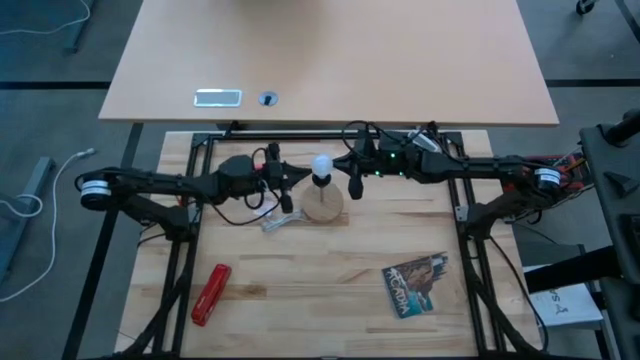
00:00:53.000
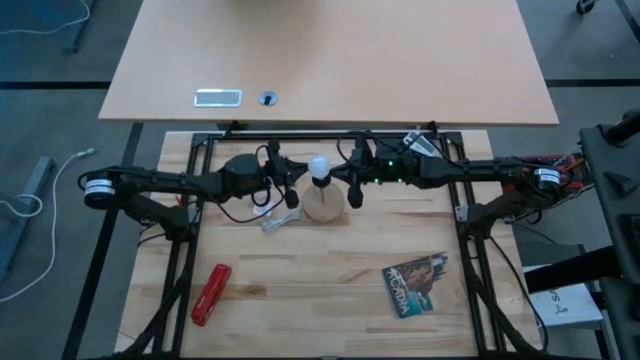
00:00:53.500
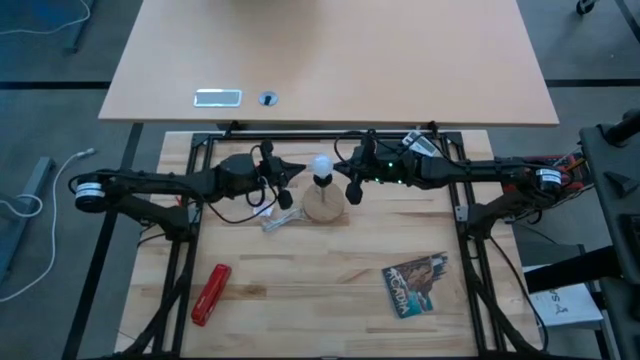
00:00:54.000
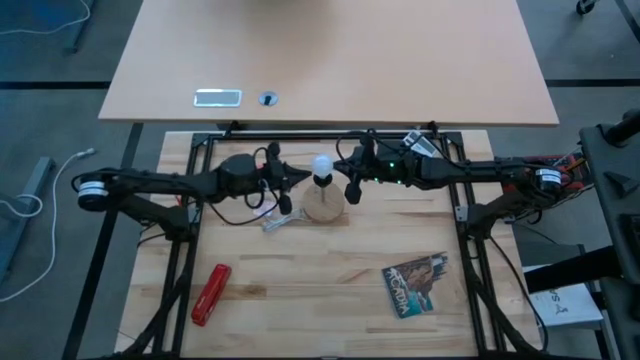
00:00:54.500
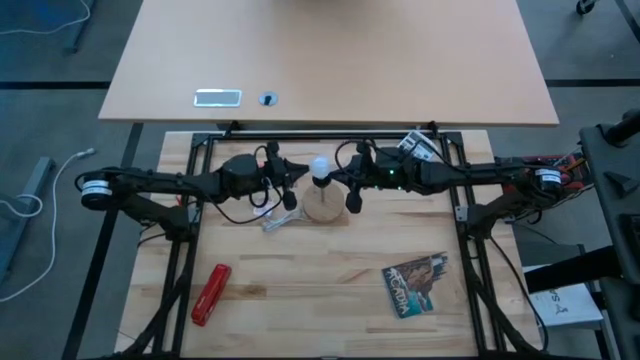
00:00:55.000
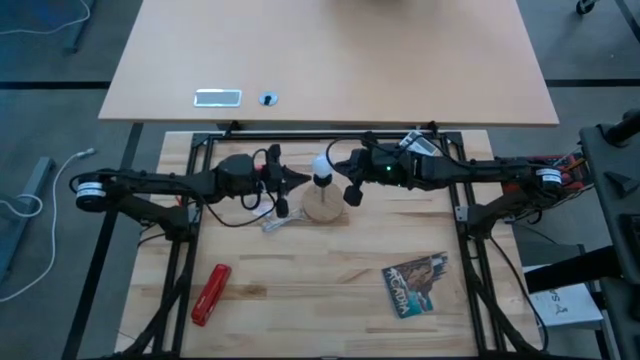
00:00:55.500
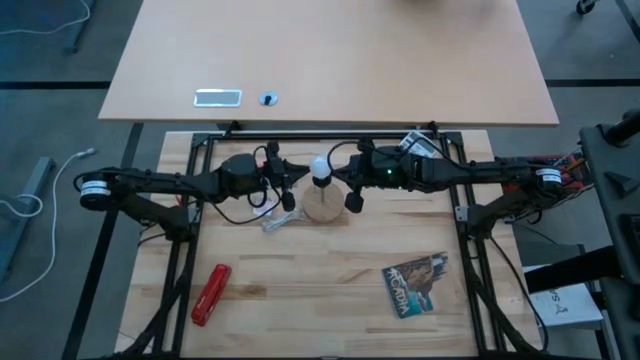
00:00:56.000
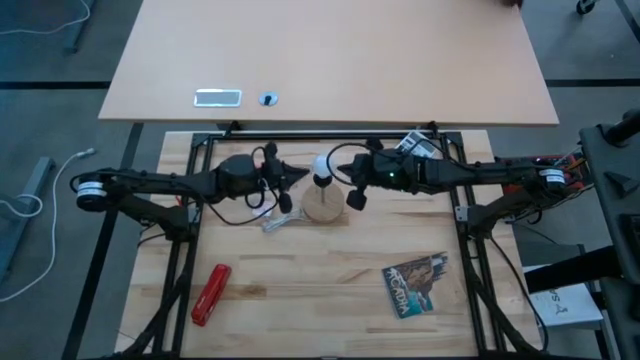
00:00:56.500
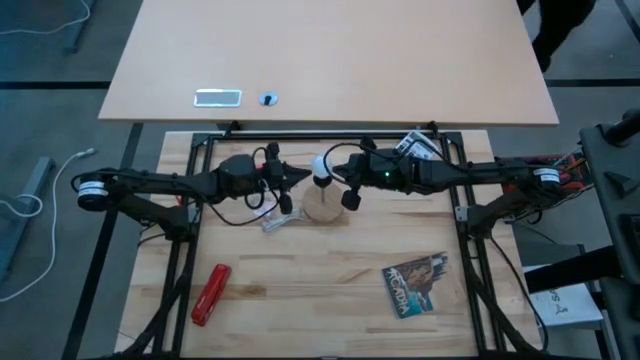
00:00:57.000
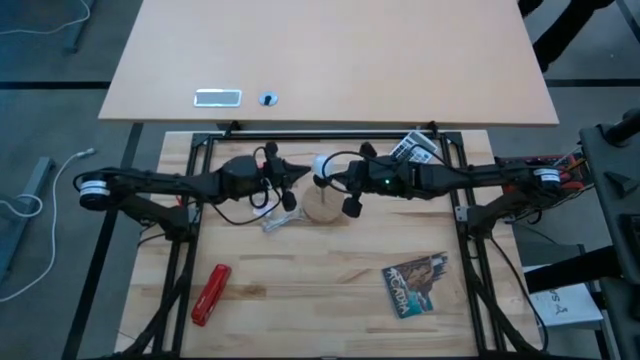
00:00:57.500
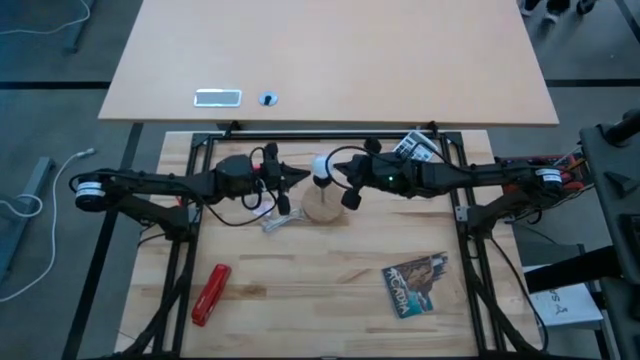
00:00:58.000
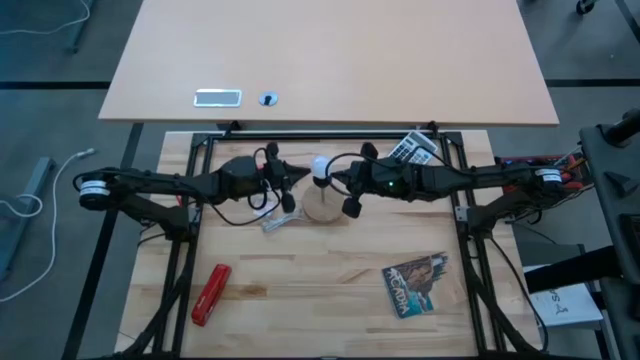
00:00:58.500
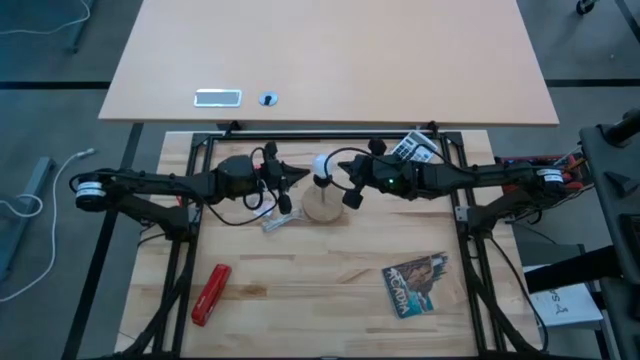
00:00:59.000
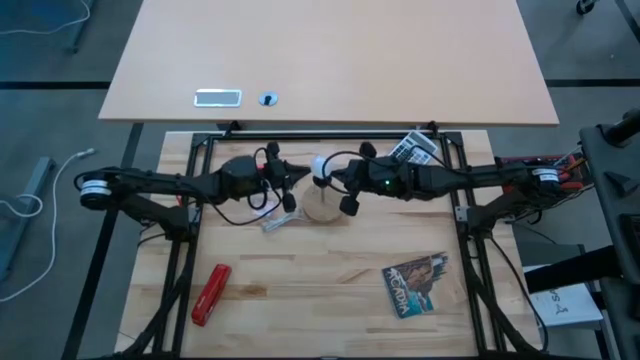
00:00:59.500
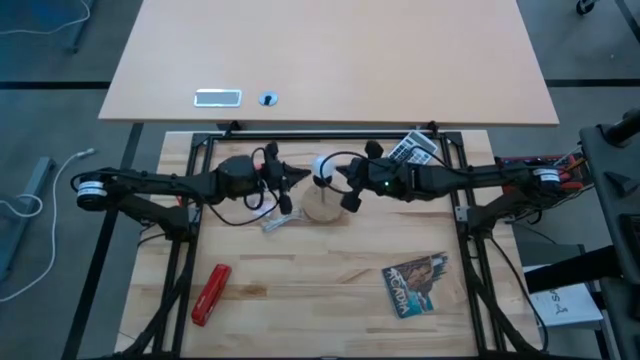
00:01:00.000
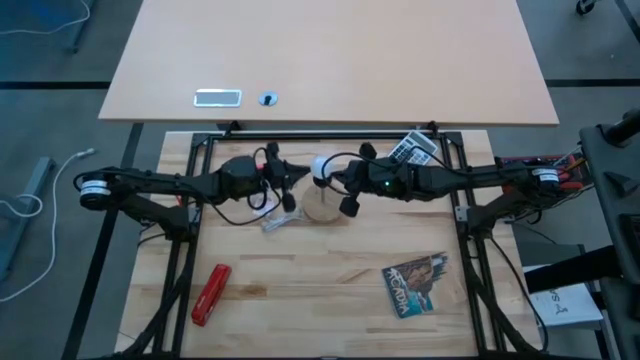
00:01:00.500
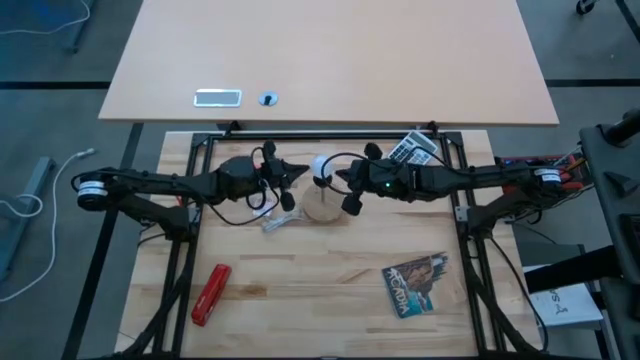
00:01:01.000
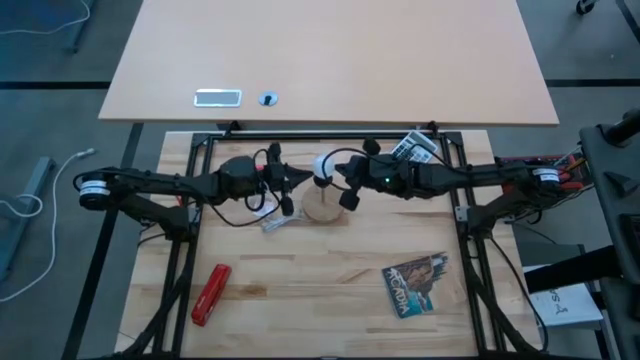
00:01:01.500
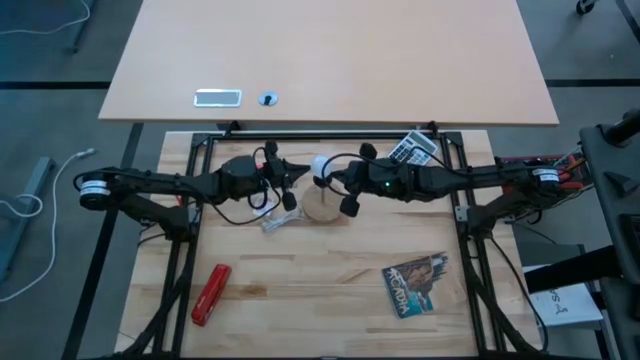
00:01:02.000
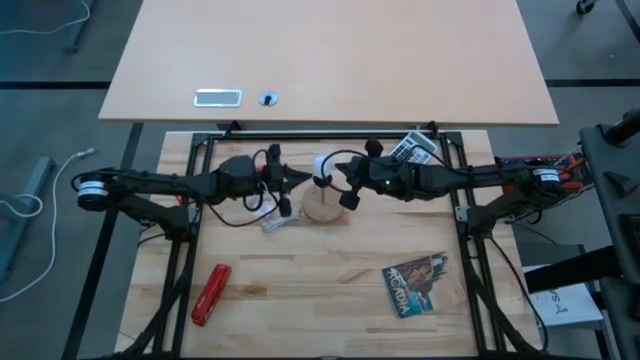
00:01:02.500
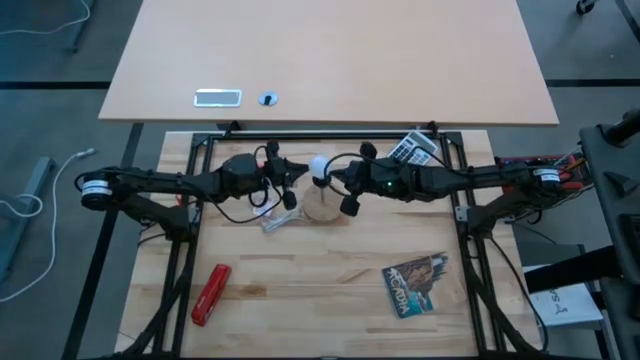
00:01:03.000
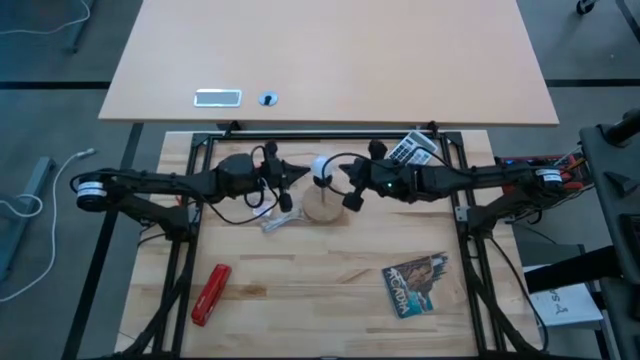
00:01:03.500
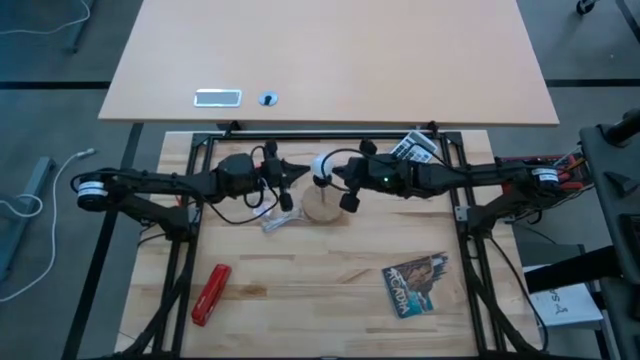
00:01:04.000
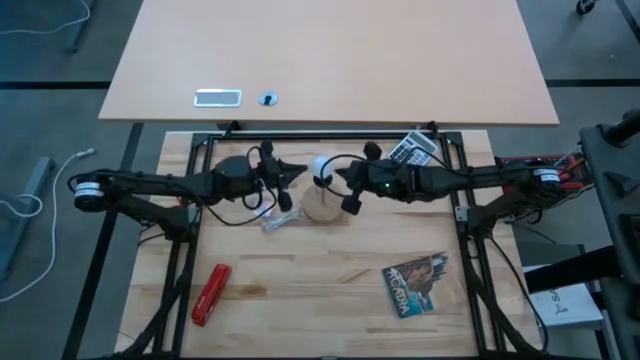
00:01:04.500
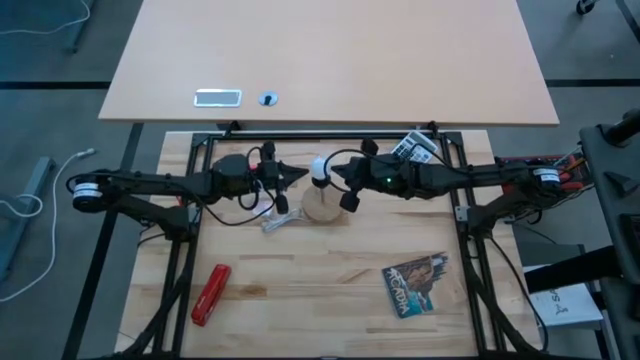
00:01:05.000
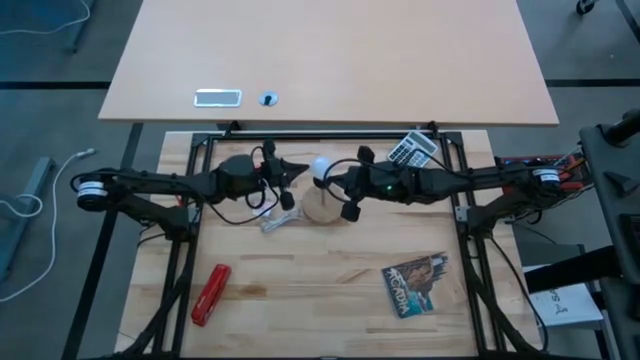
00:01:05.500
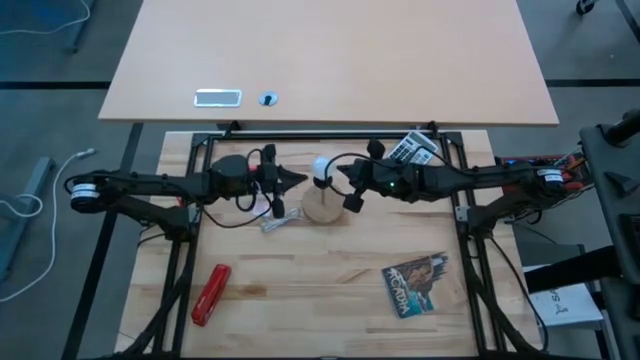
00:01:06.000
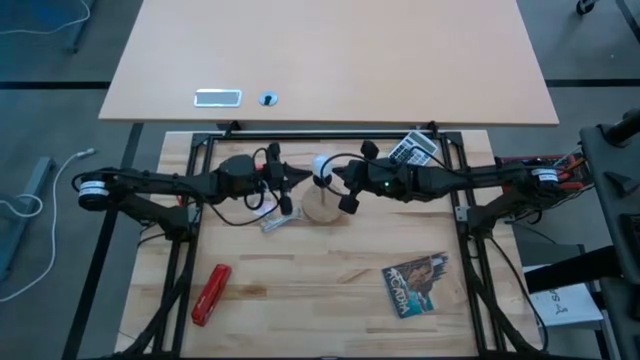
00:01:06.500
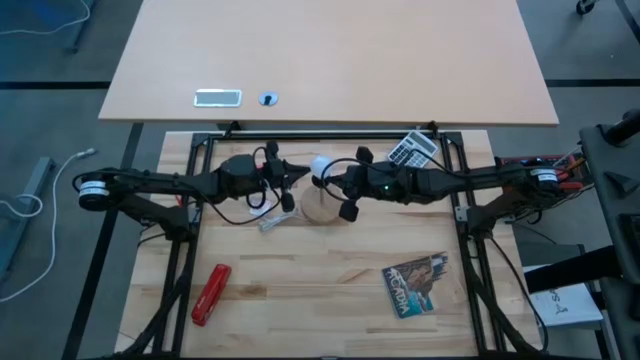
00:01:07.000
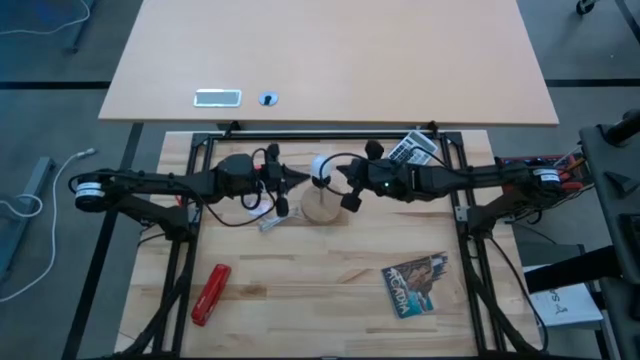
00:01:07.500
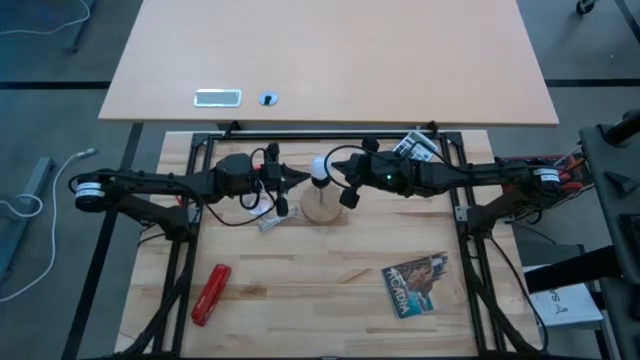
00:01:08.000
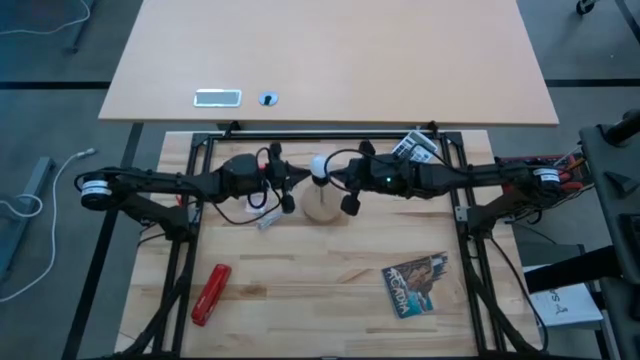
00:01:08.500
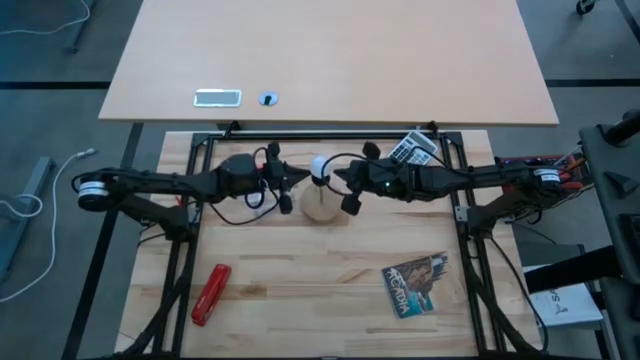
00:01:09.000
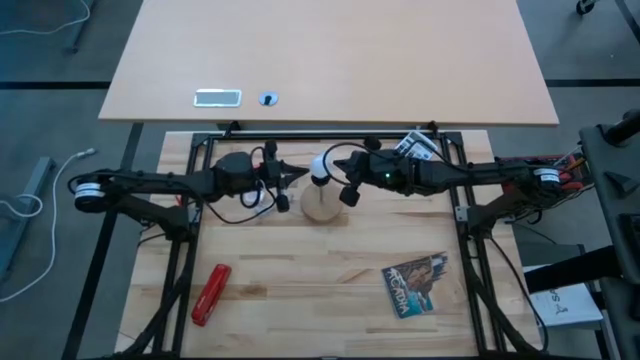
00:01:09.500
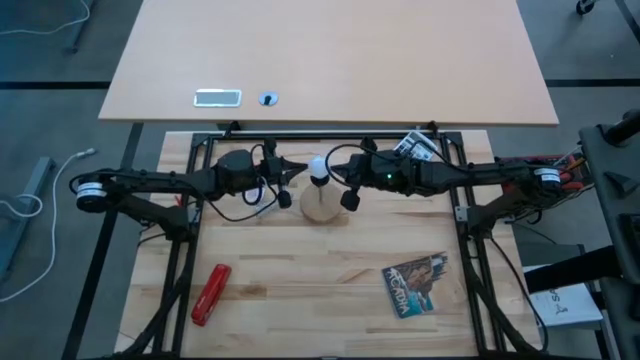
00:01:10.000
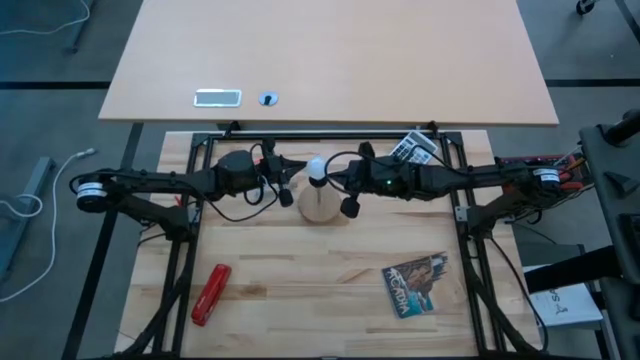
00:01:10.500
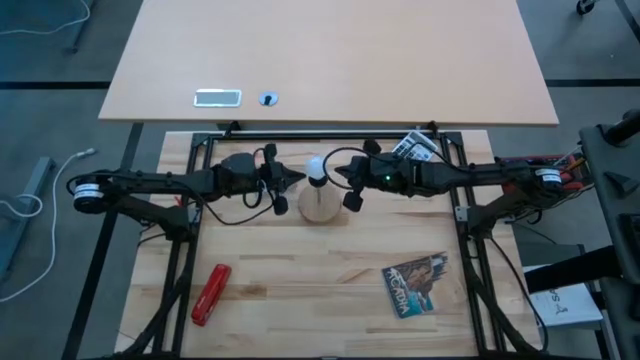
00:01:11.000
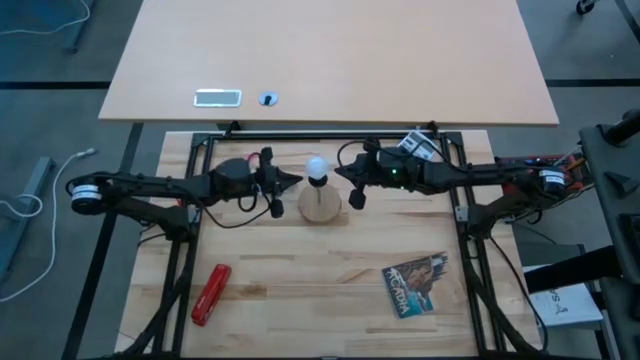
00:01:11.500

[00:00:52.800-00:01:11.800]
Task: Screw lightbulb
Insert the lightbulb into the lamp
